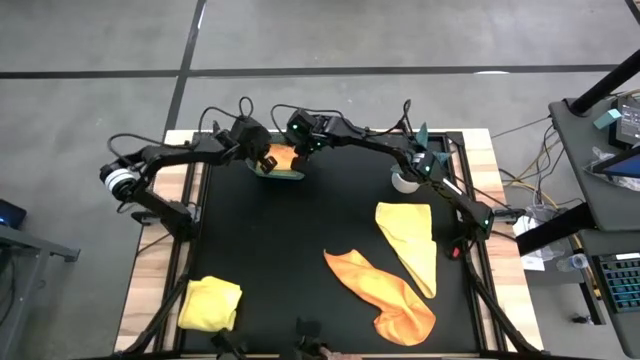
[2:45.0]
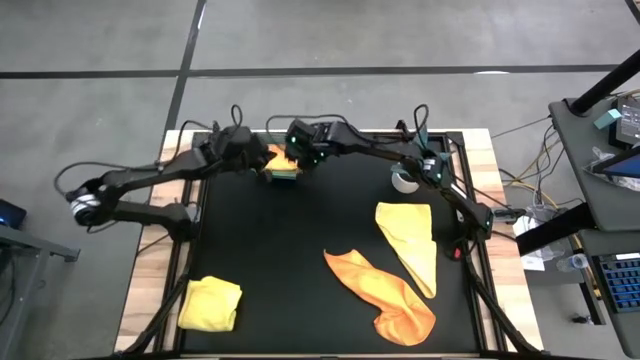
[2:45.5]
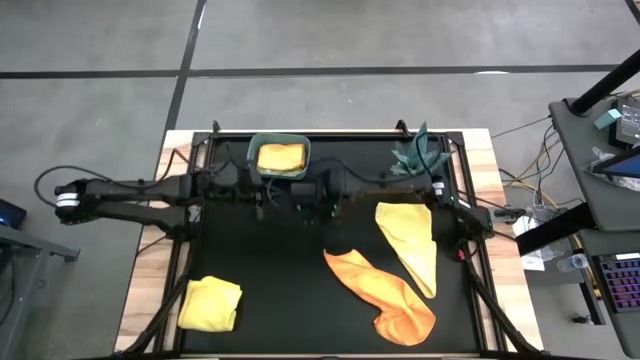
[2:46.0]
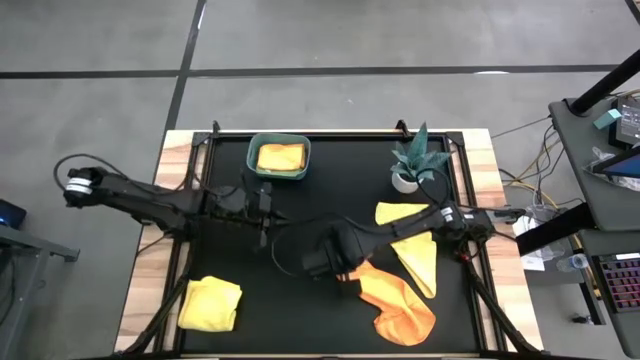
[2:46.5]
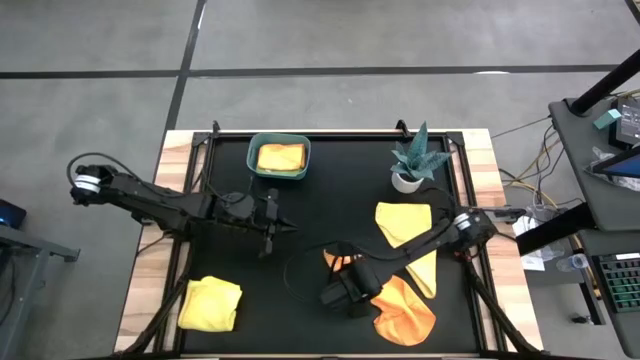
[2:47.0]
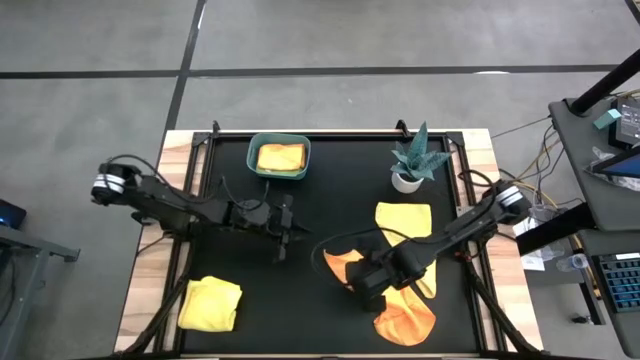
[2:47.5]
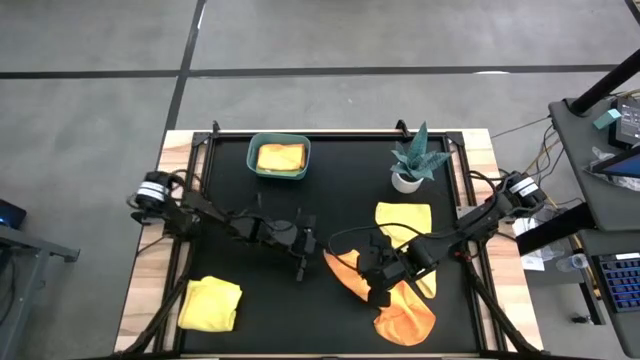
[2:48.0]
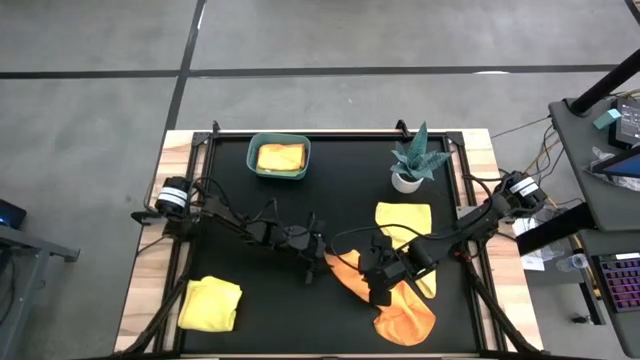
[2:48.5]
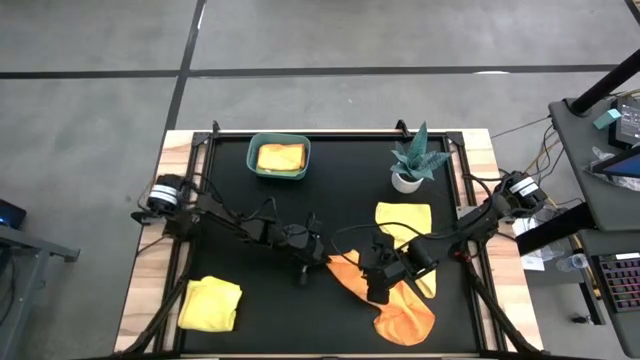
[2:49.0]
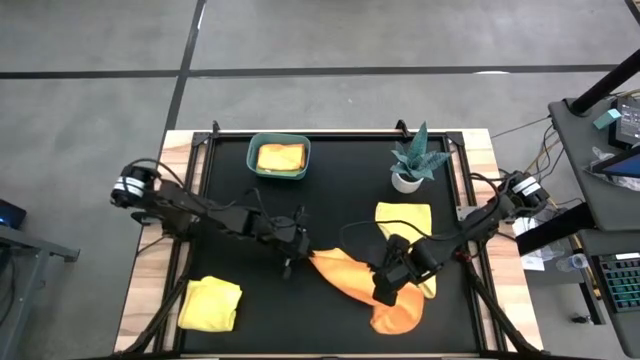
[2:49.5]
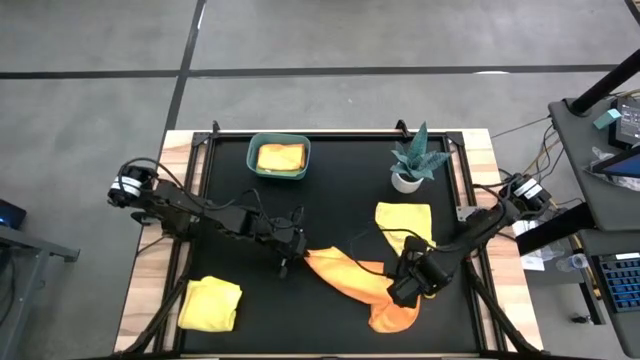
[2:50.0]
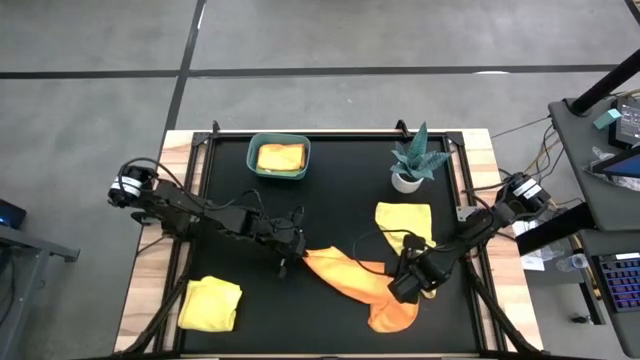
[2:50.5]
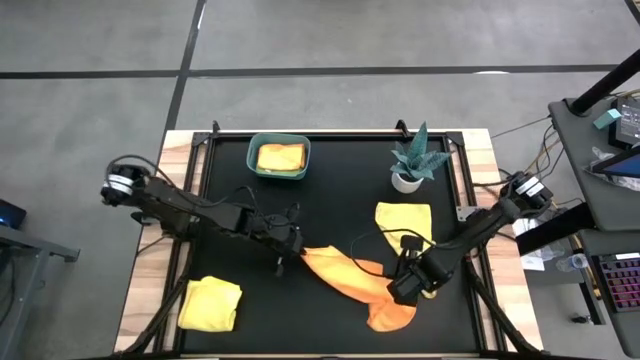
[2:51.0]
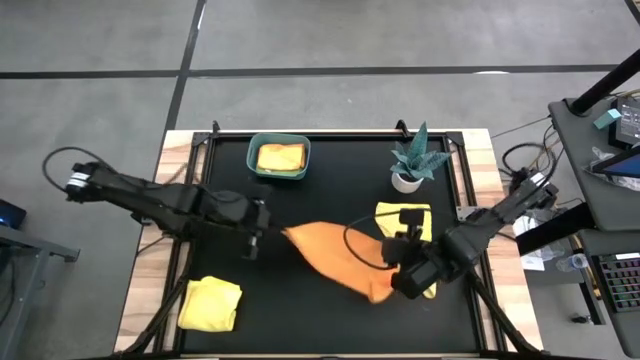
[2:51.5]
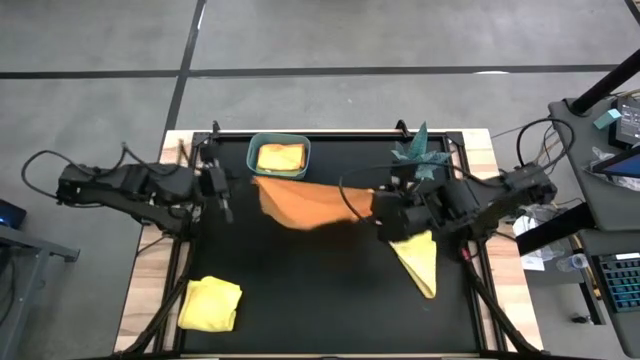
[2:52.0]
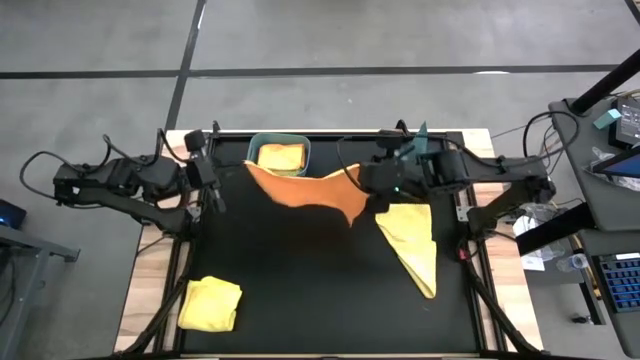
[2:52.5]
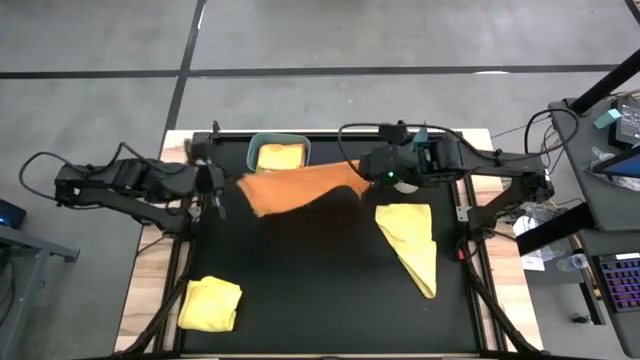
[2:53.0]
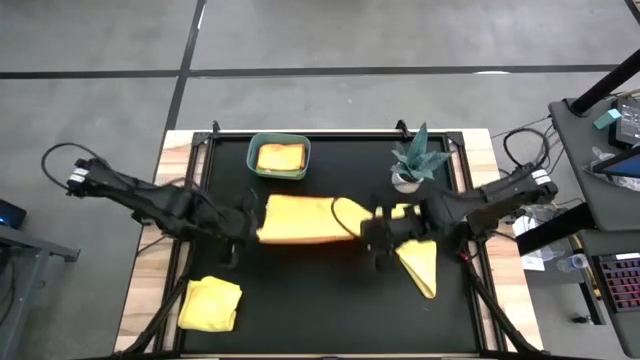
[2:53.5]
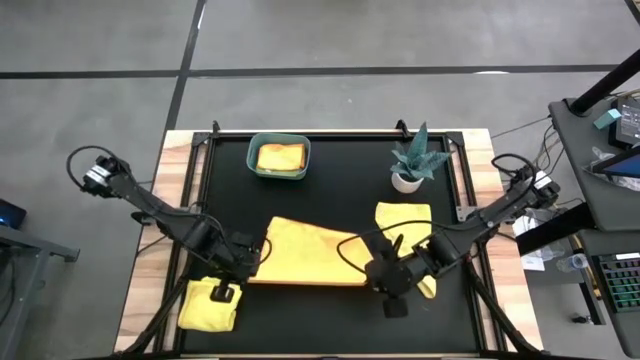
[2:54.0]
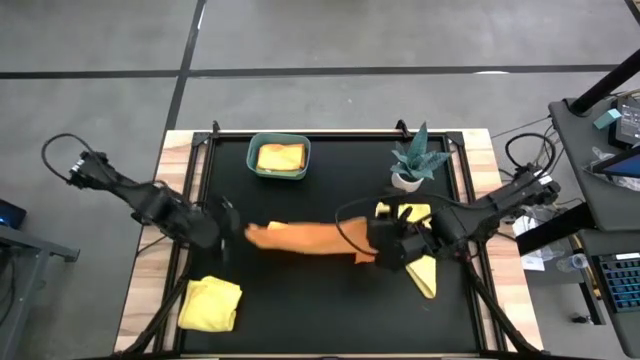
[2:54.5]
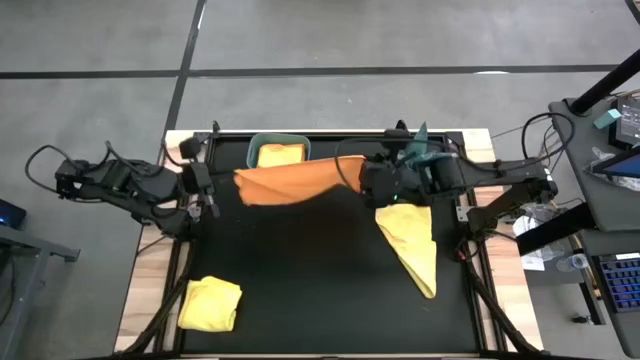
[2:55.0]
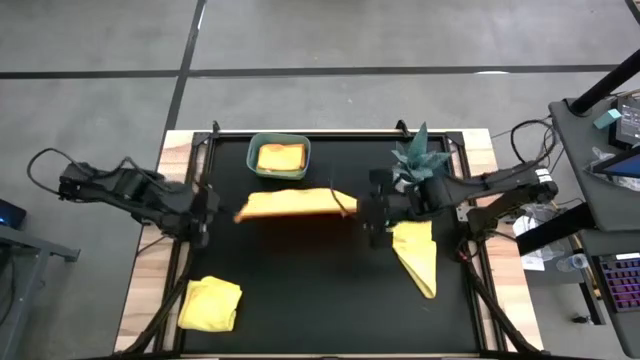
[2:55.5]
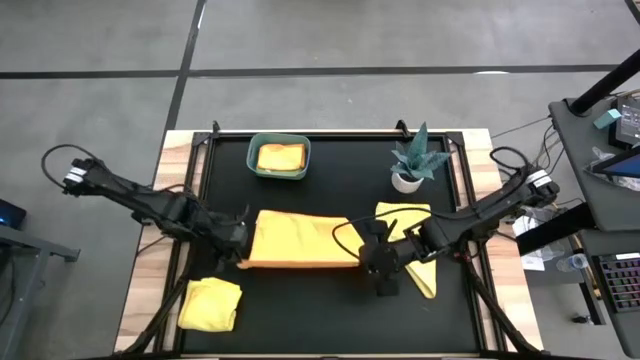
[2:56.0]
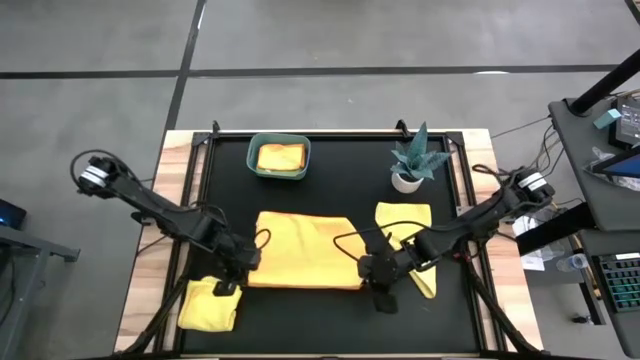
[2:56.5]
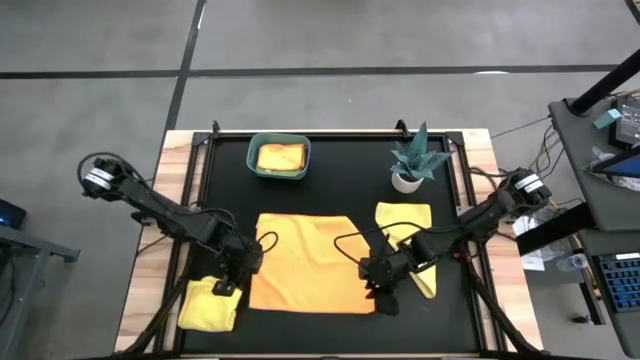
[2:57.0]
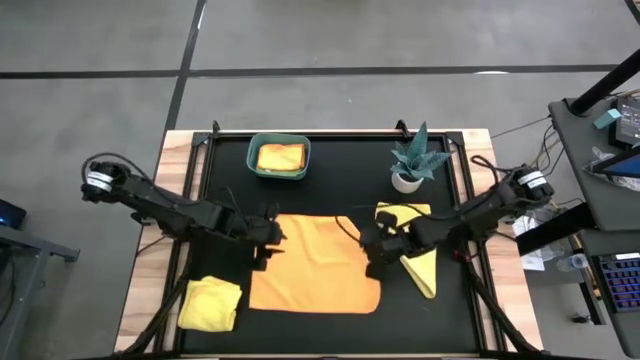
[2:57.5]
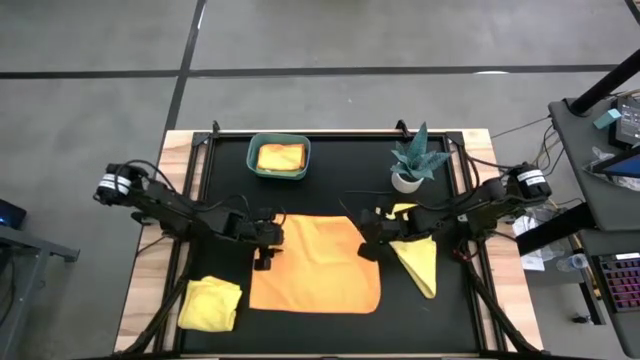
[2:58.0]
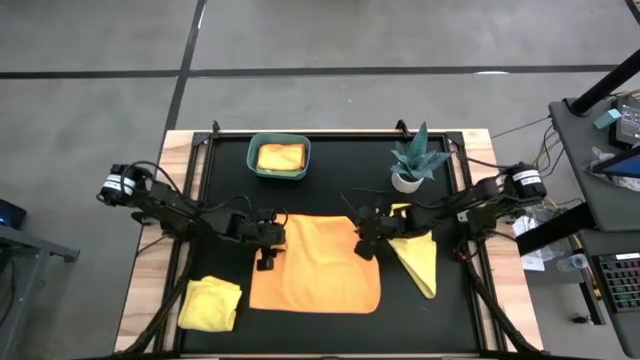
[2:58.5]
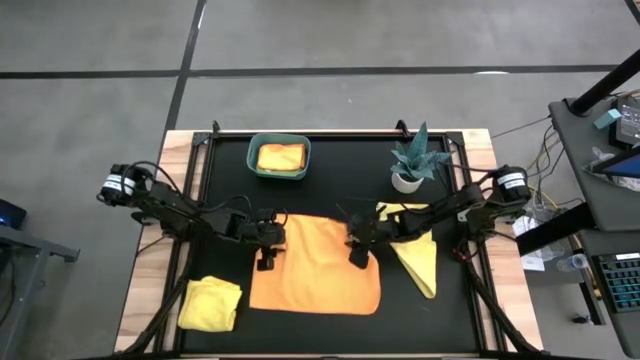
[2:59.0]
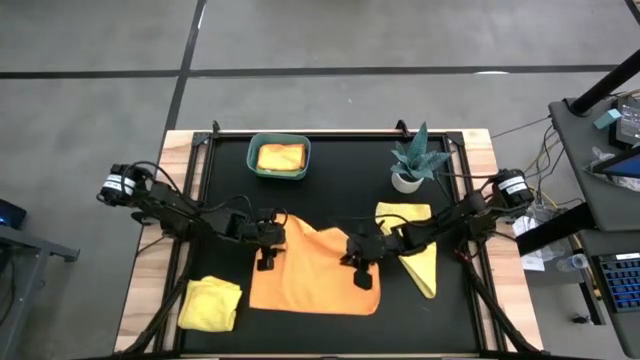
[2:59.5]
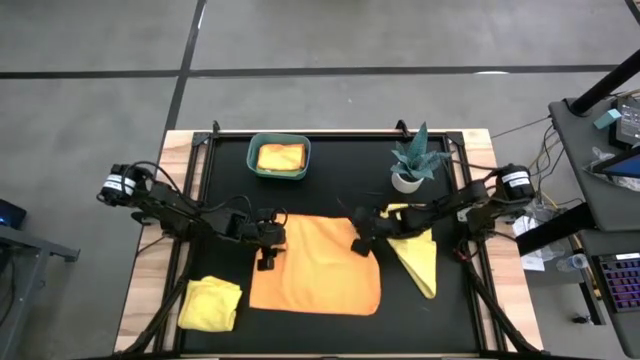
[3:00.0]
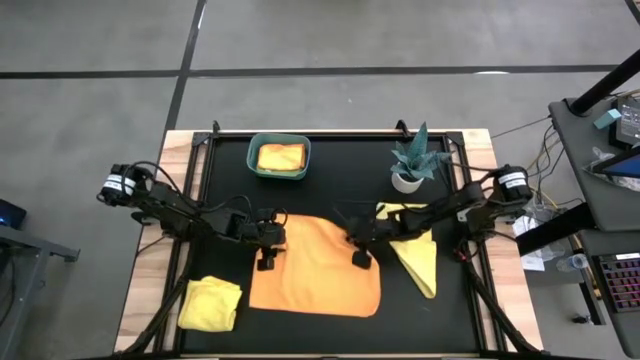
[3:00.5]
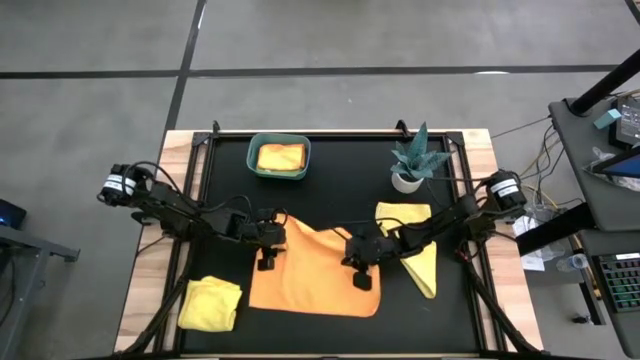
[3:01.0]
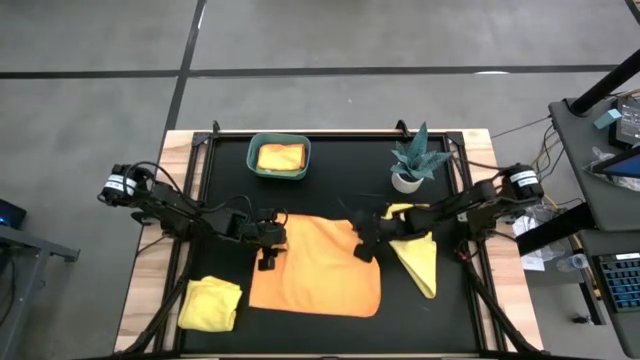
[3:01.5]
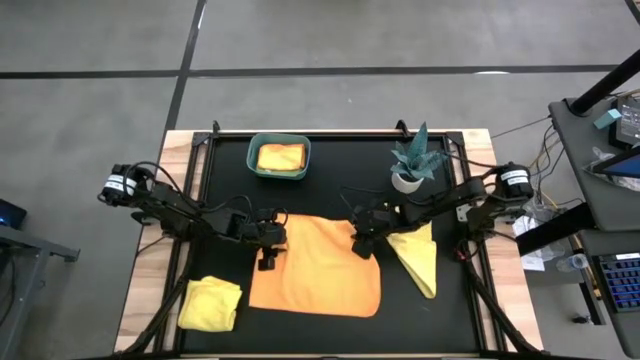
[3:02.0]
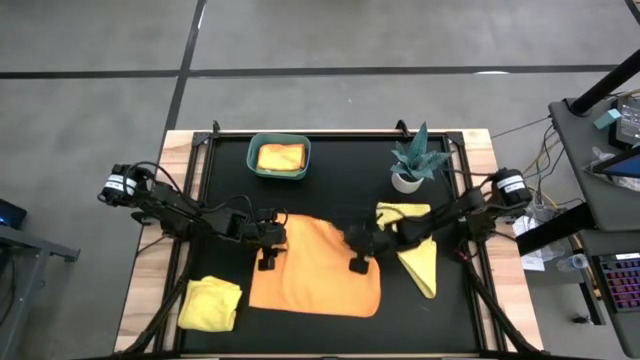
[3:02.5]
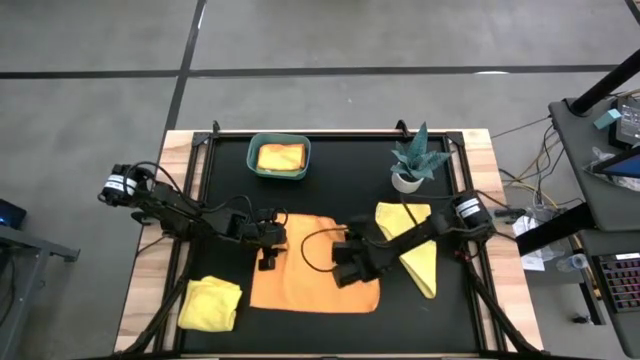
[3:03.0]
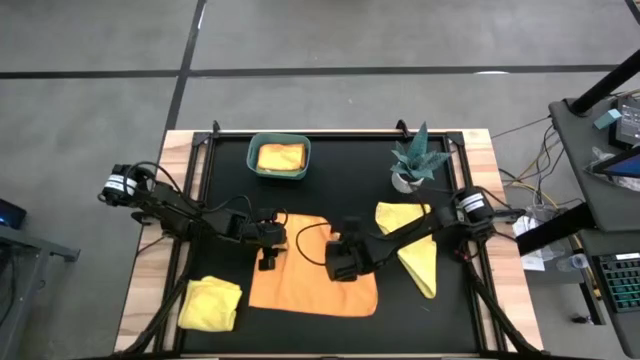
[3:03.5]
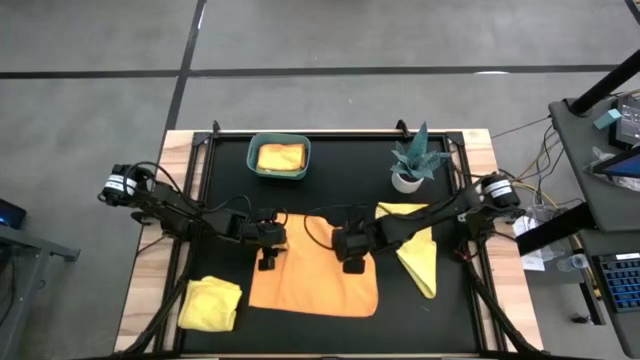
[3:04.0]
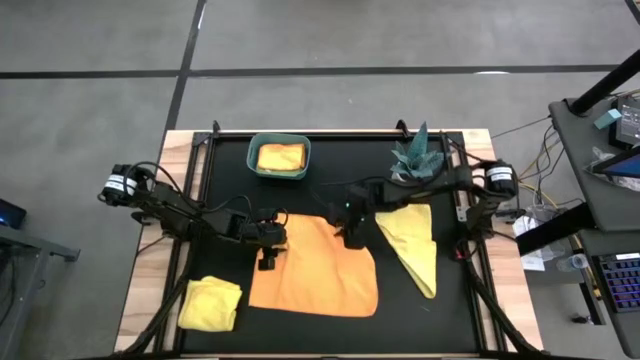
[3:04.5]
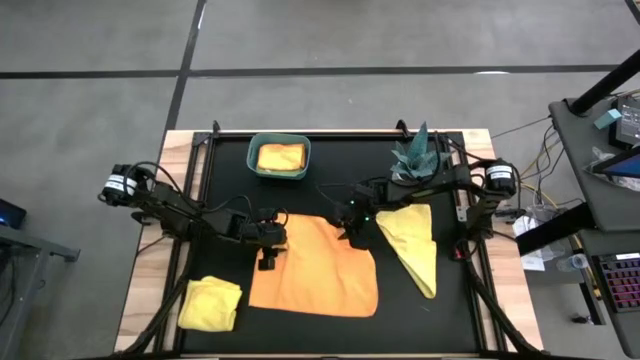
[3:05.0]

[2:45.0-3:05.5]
Task: Fold microfiber towels
Fold the orange microfiber cloth
